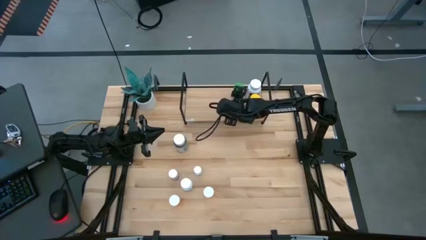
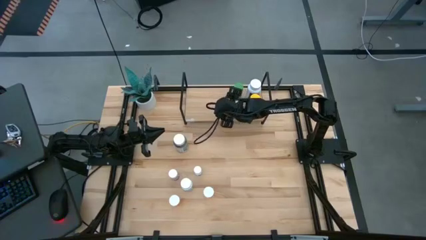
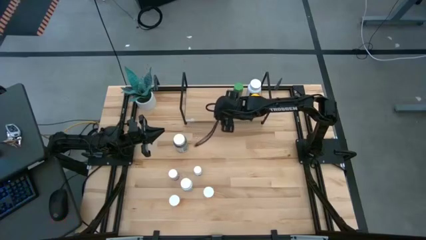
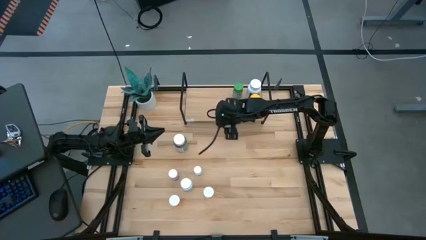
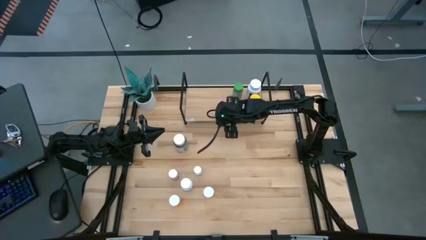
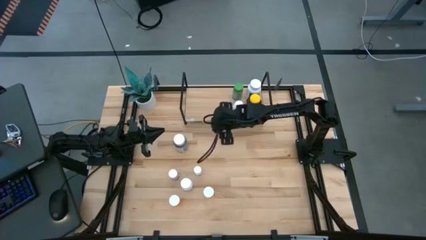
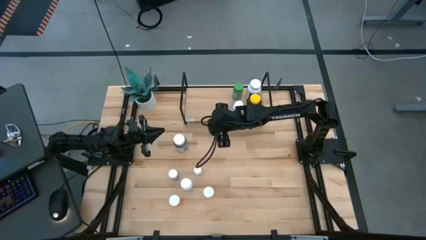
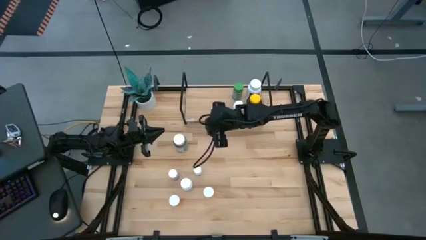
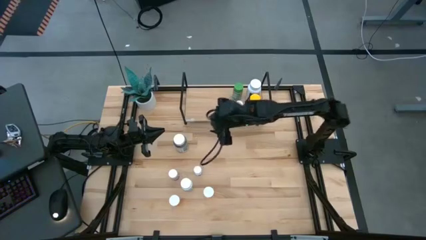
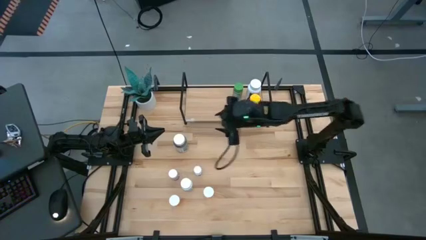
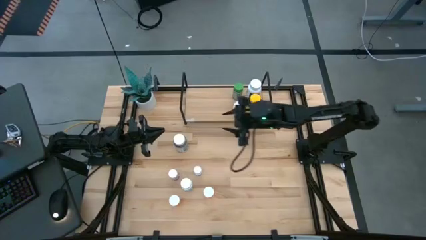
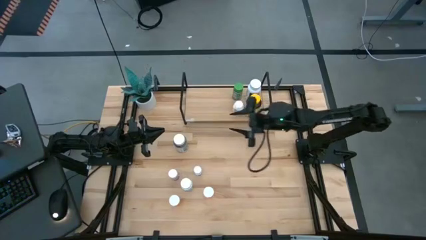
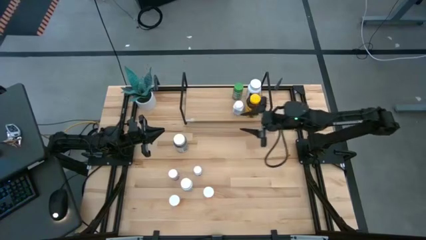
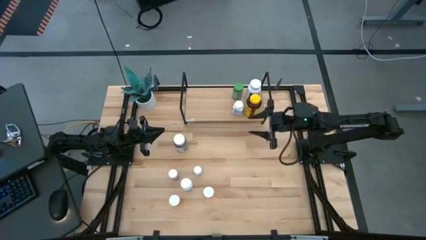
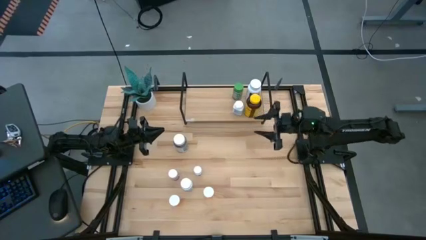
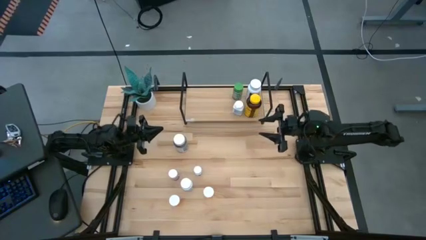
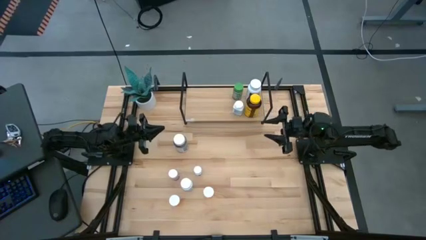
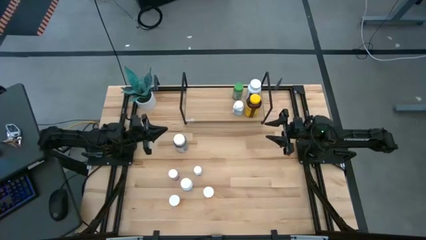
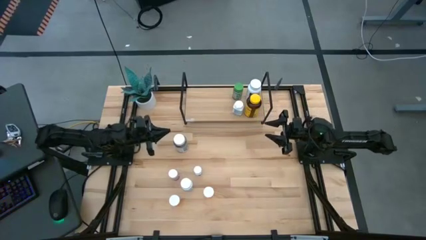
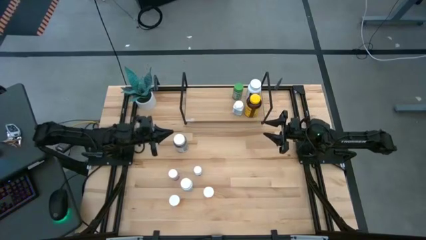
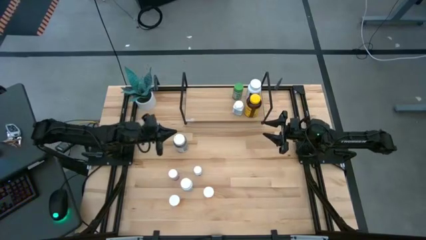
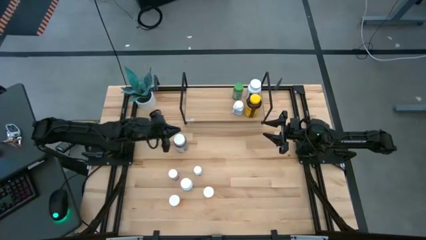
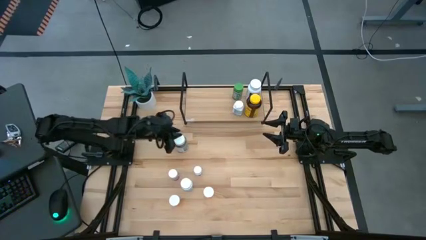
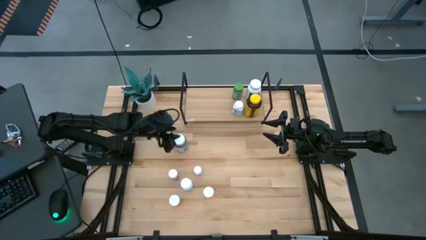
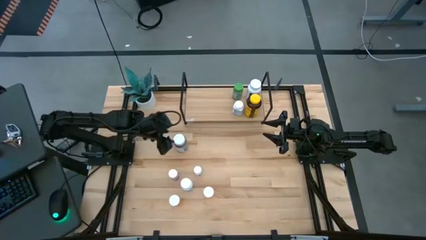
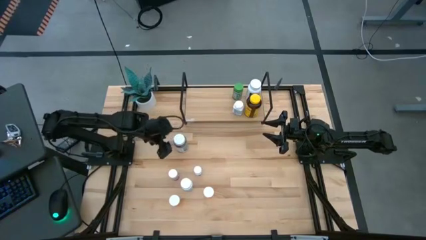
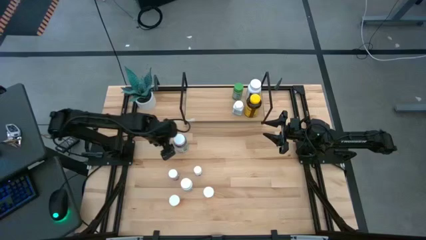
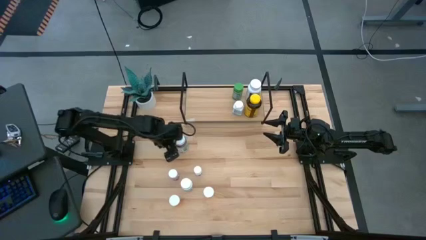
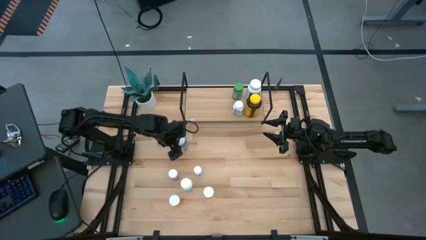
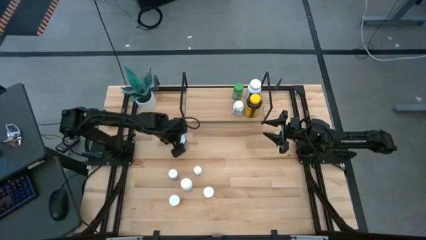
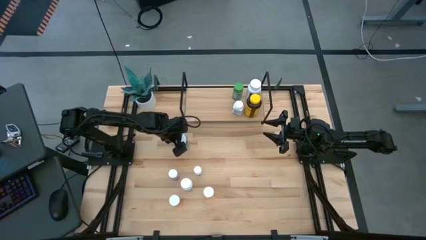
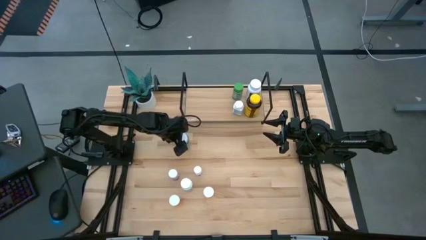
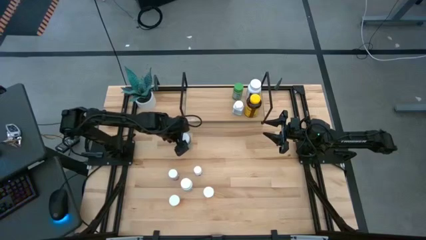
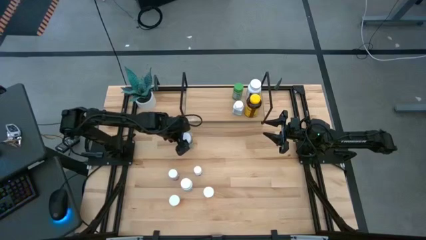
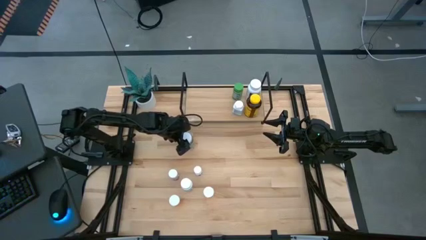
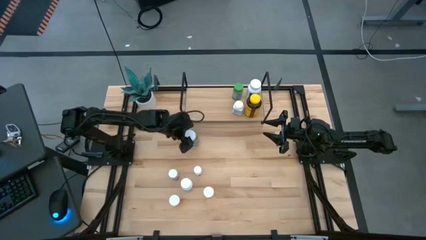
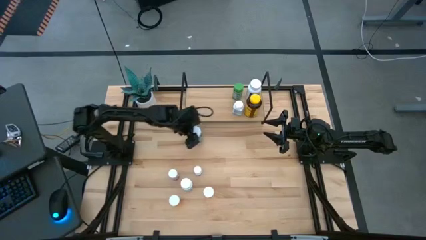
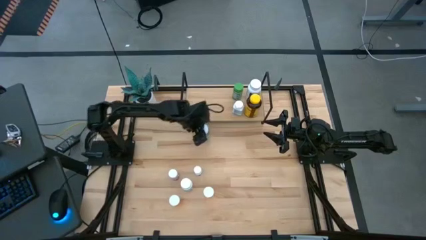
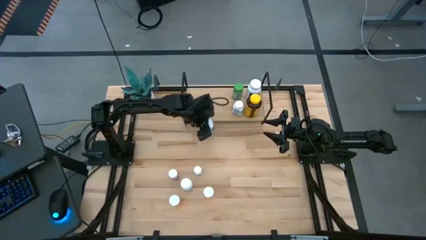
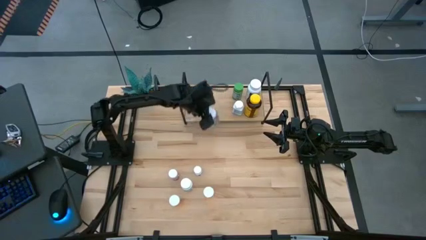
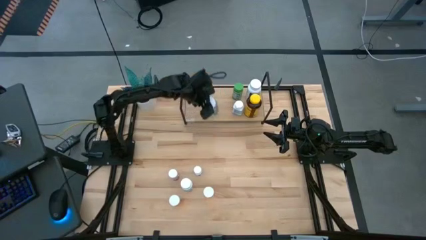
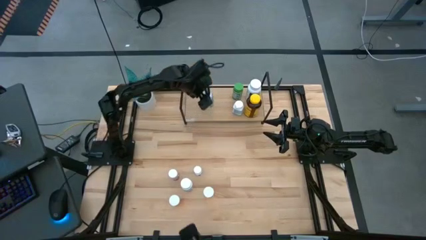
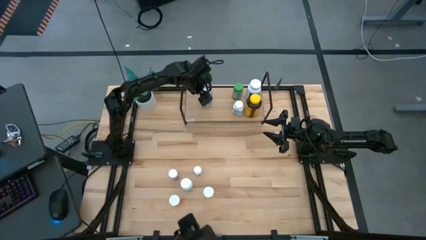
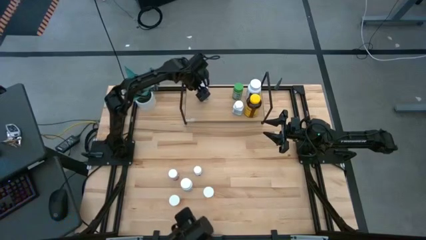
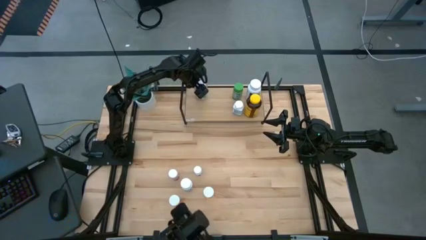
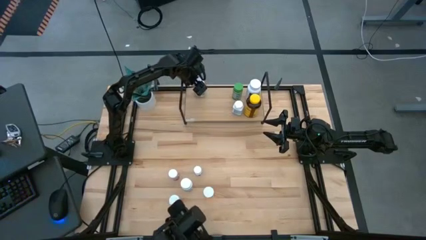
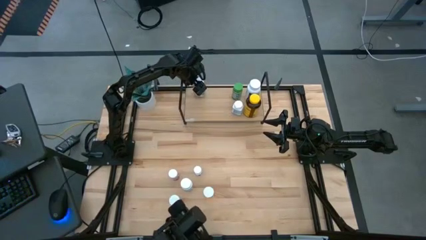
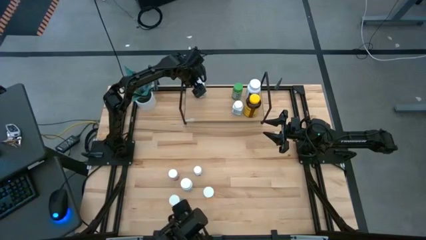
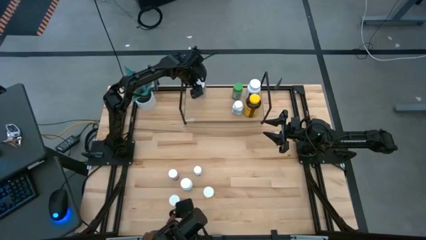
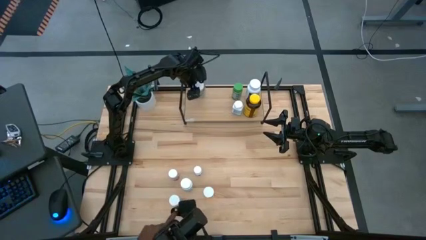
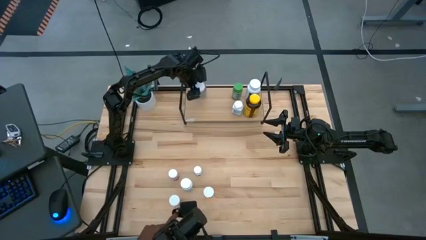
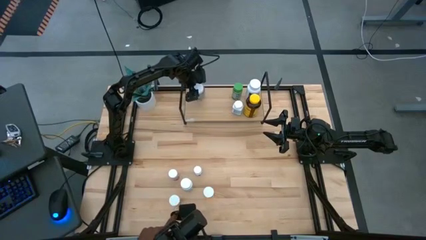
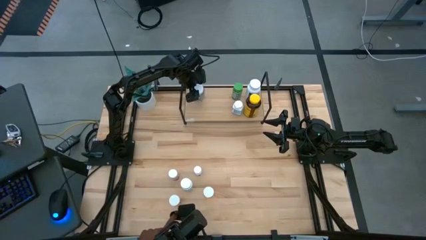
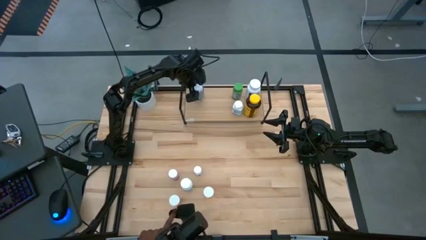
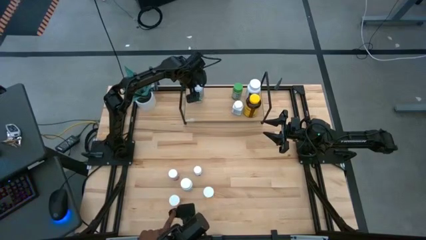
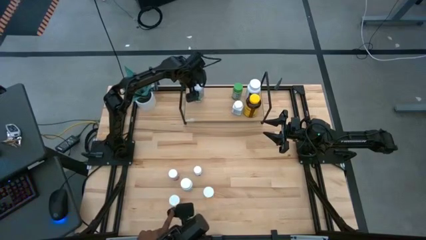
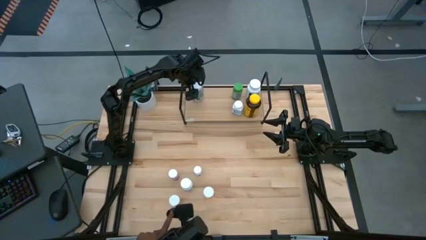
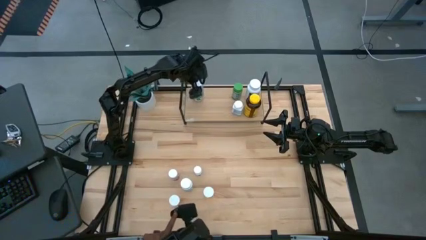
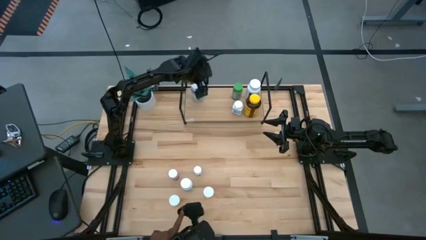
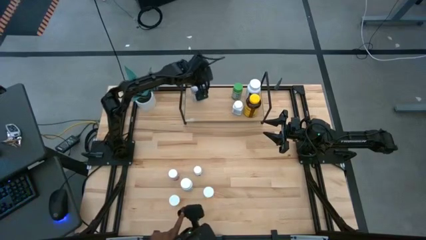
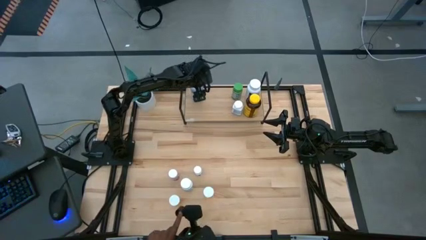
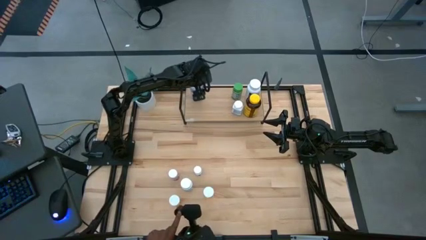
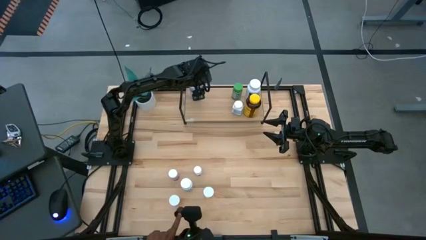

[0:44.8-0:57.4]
Task: Pick and place medicine bottles onto shelf by color
Put the green white medicine bottle on the shelf
